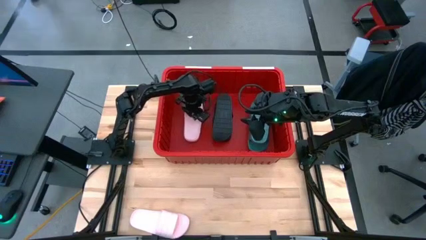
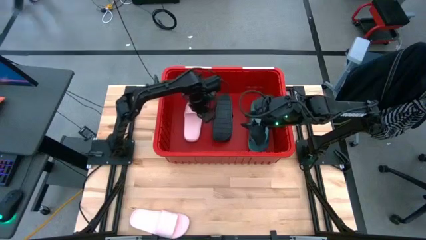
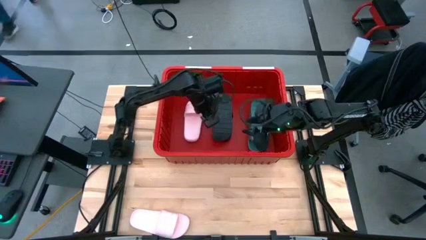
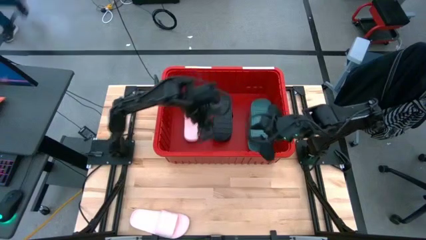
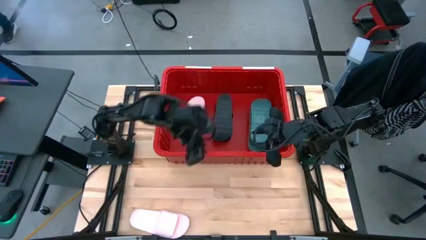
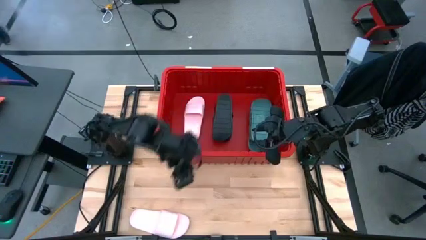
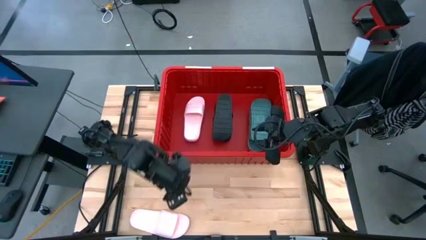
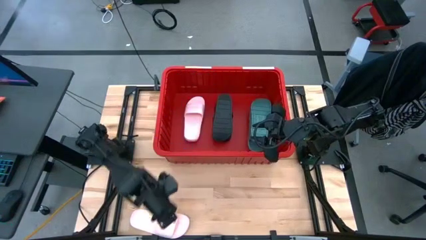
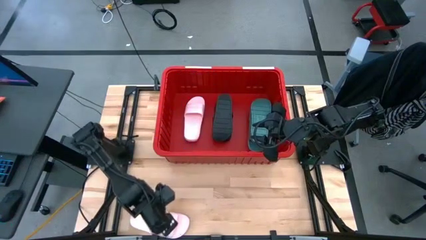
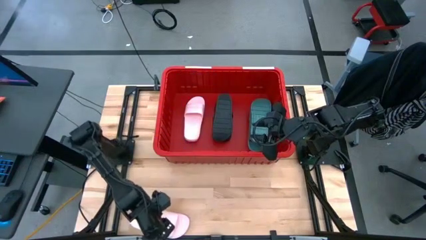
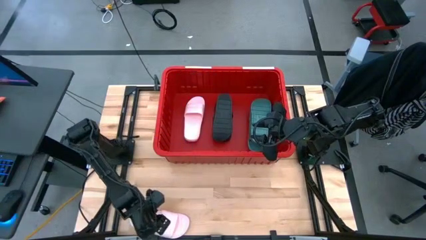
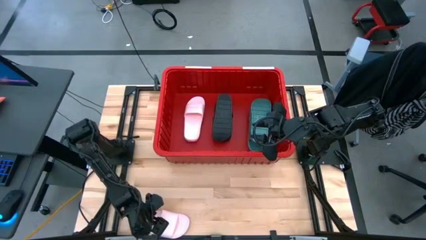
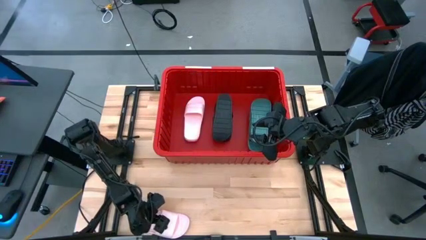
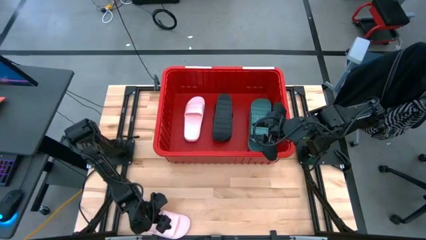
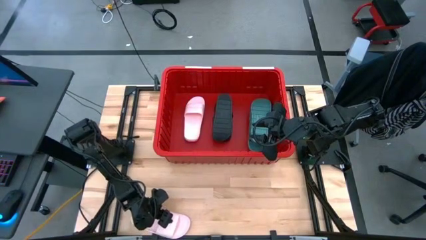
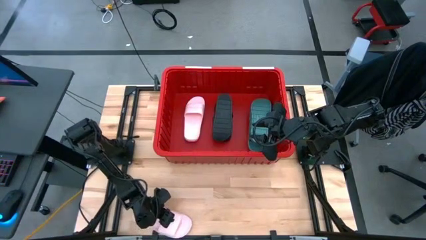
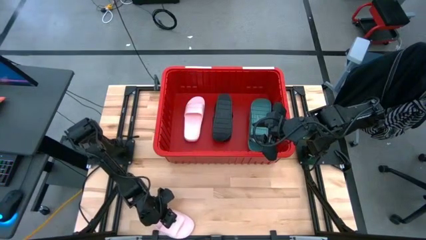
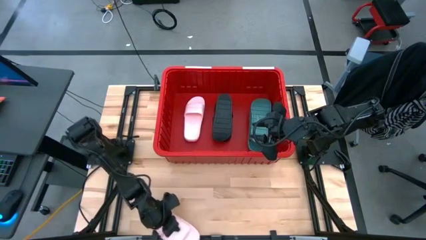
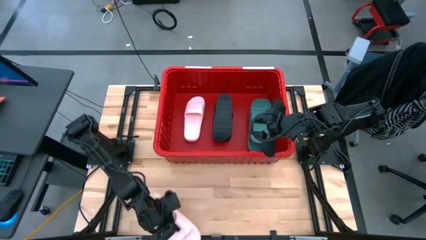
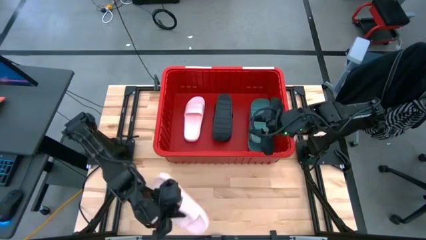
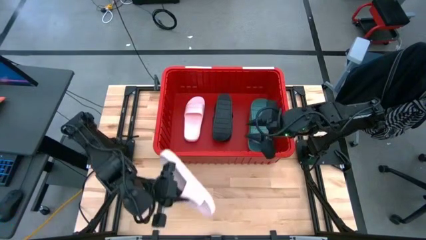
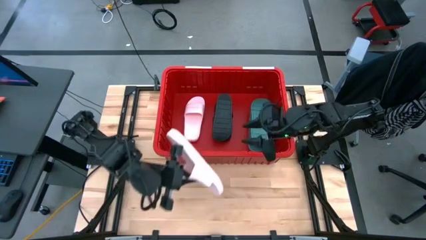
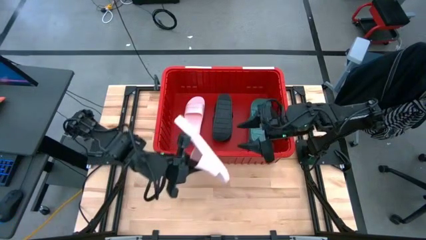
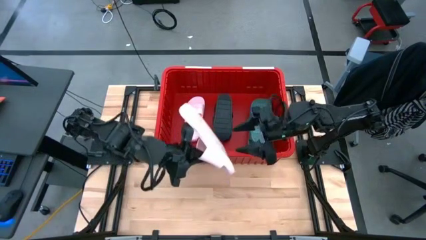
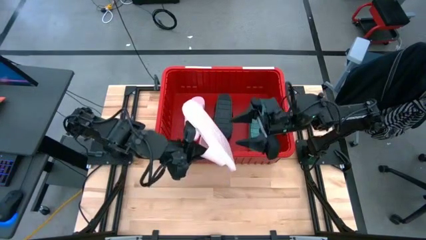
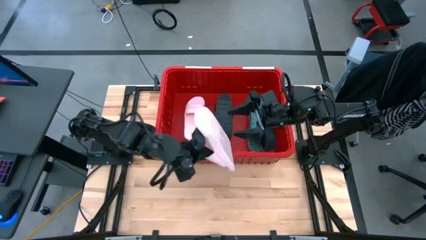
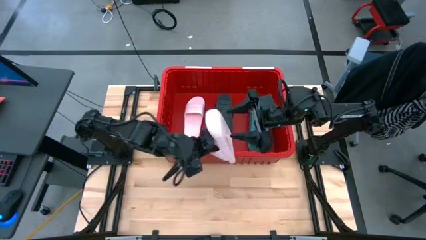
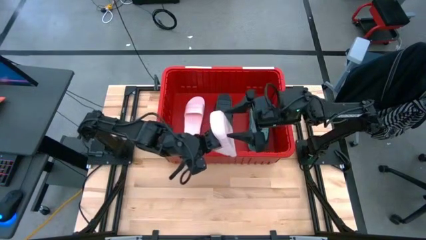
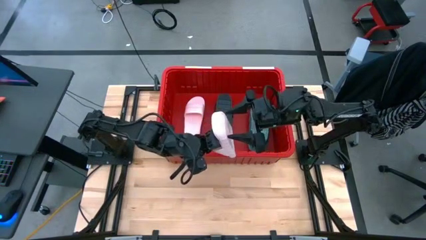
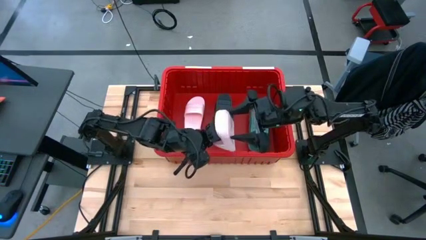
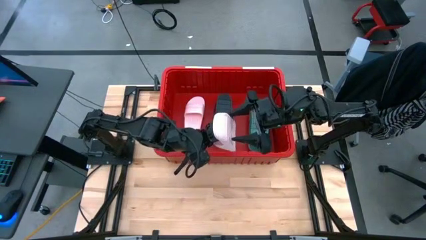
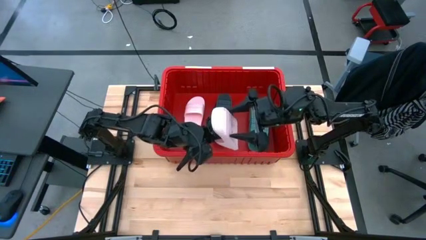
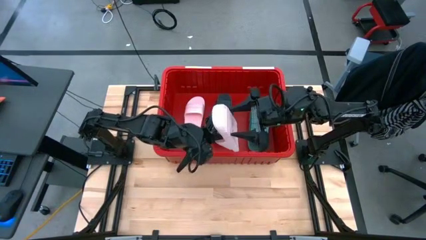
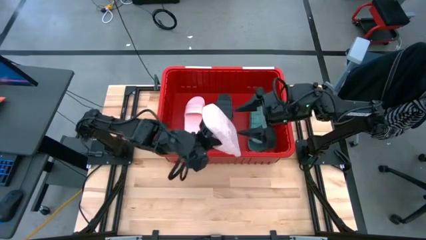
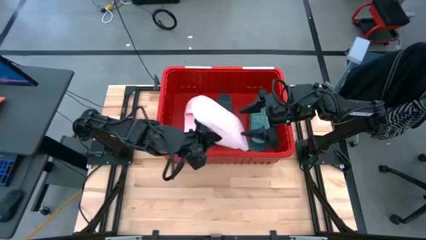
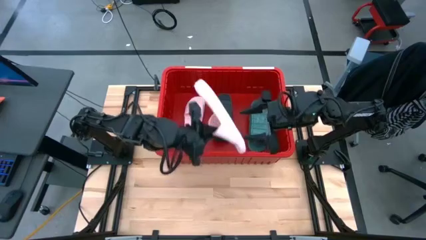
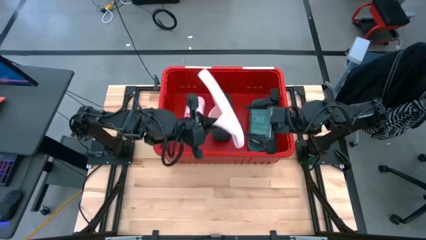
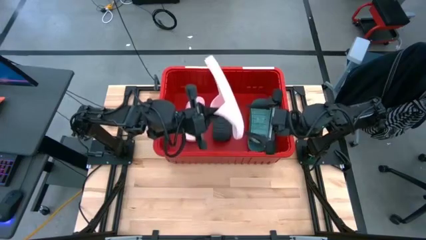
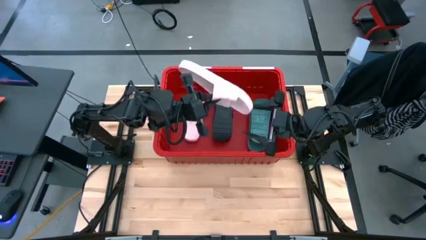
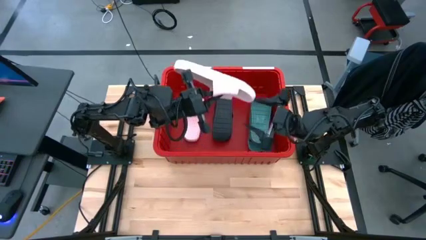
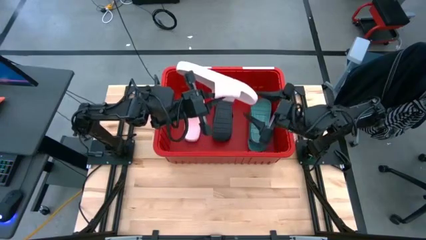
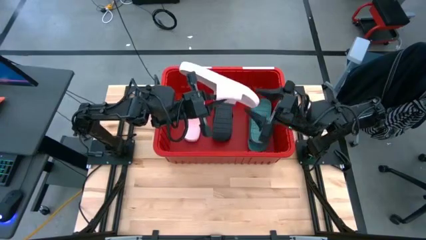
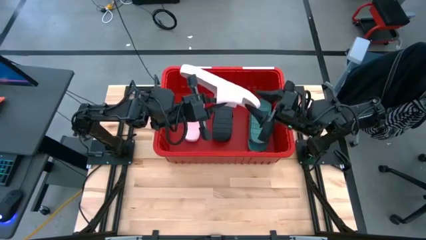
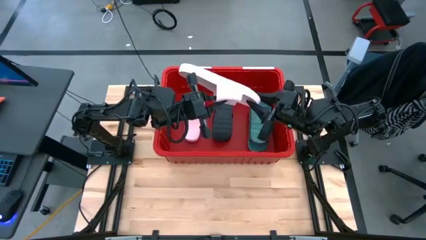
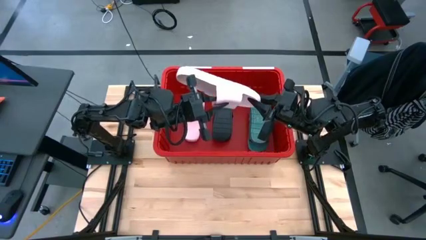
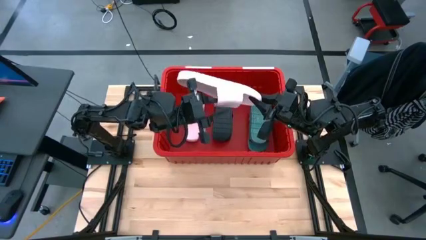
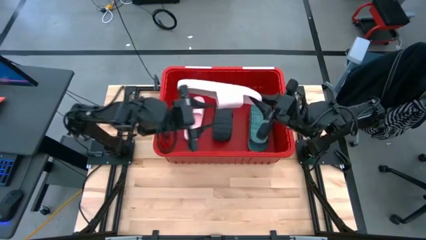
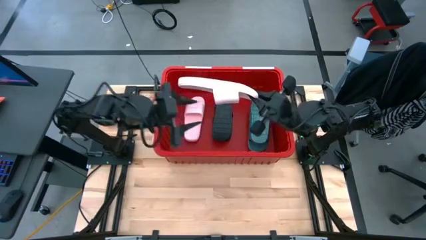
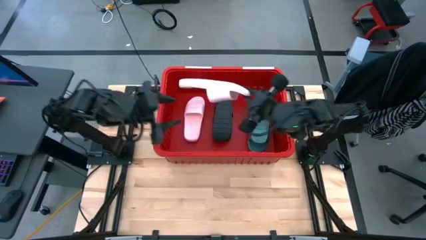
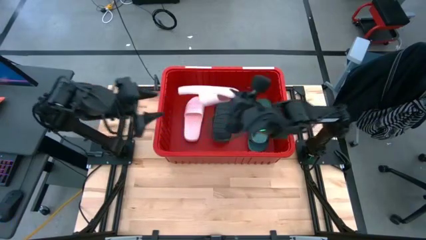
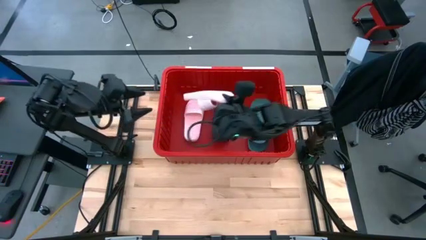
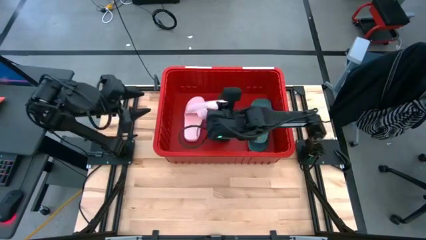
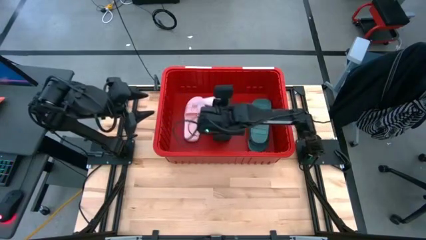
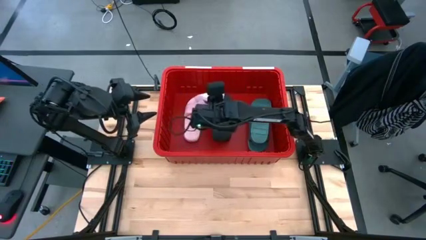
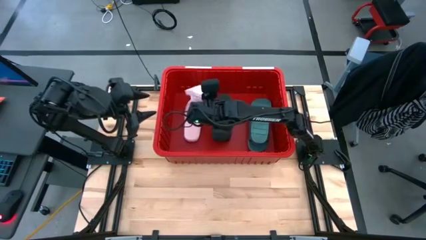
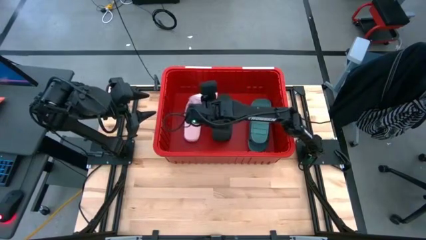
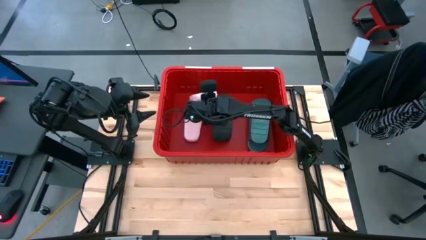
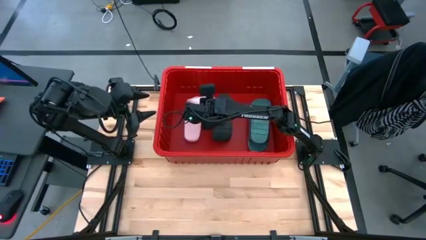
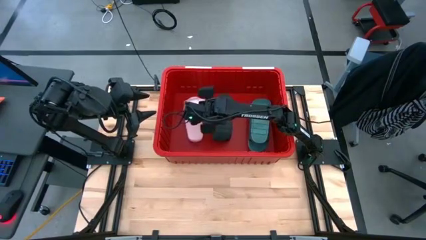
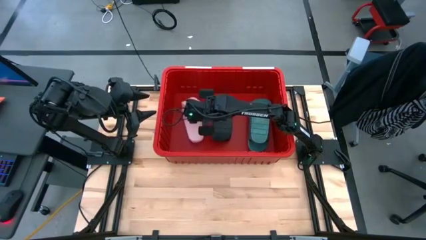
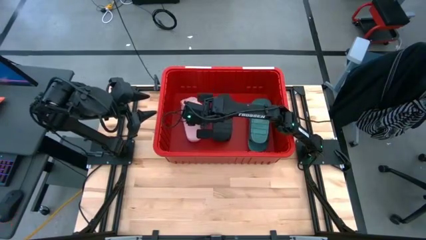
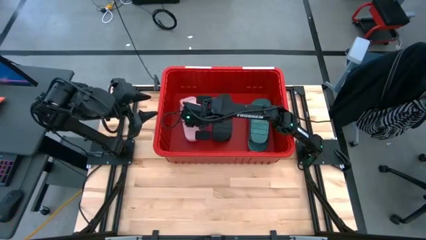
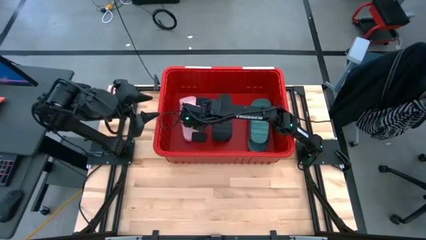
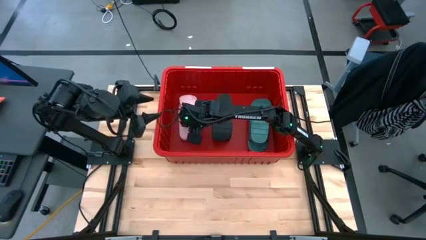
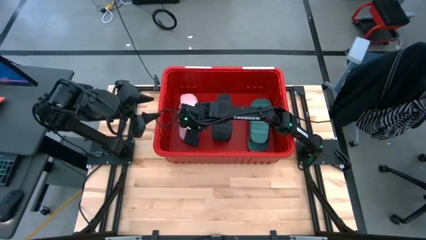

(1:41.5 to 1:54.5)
Task: Pick and place slides into bin
Put the pink slides into the red bin
